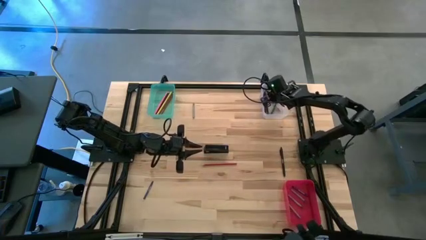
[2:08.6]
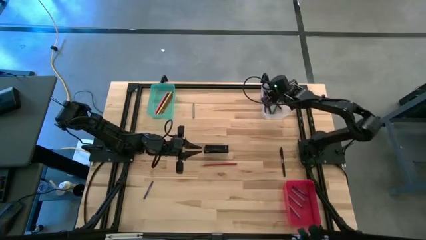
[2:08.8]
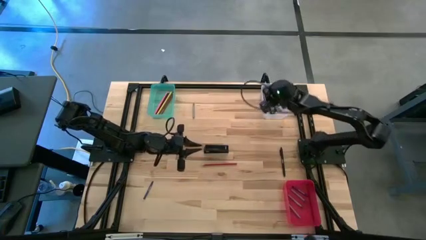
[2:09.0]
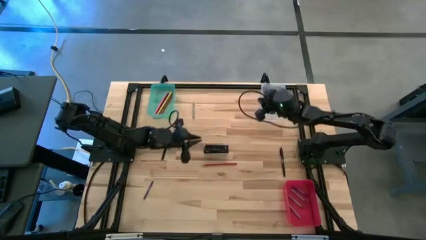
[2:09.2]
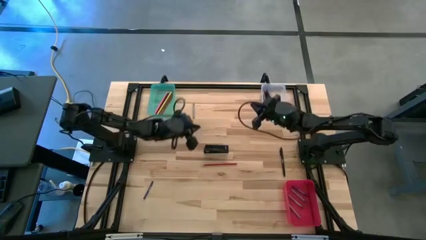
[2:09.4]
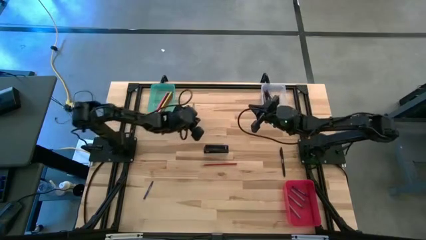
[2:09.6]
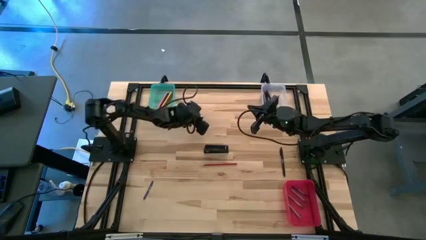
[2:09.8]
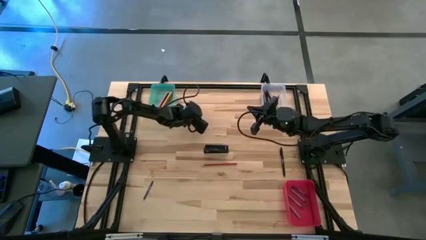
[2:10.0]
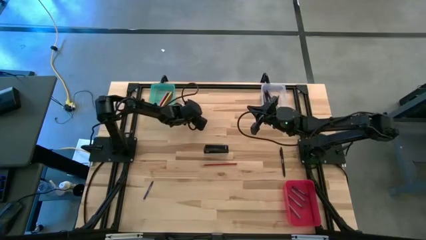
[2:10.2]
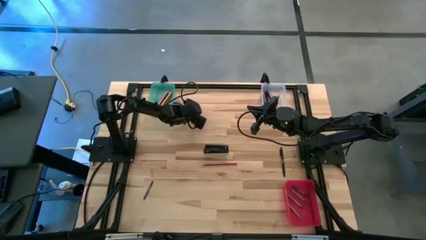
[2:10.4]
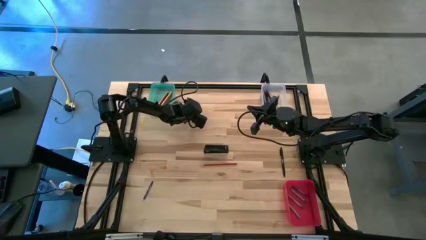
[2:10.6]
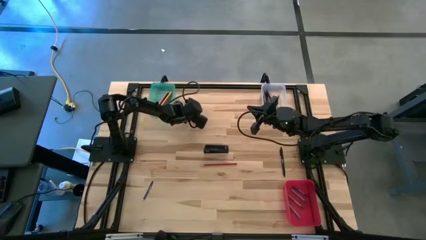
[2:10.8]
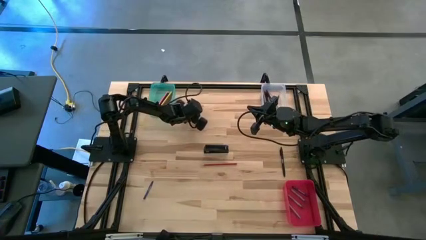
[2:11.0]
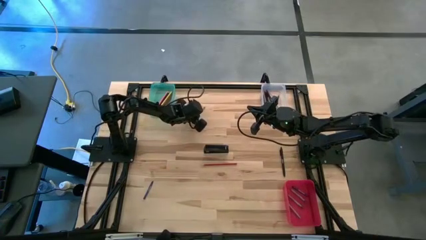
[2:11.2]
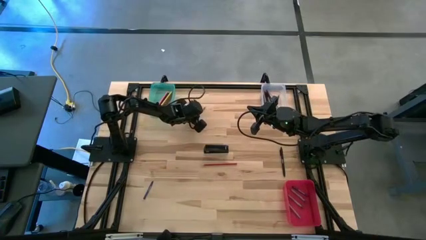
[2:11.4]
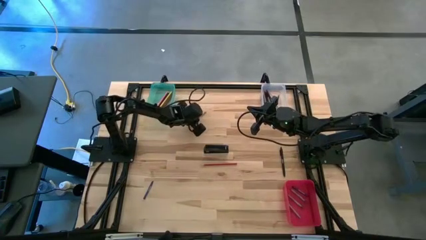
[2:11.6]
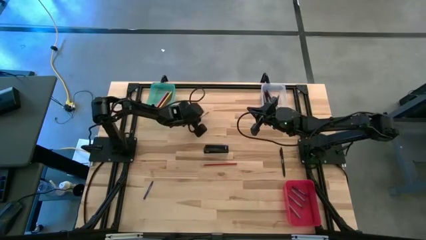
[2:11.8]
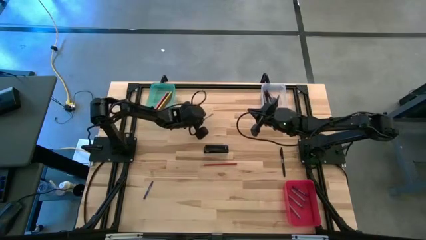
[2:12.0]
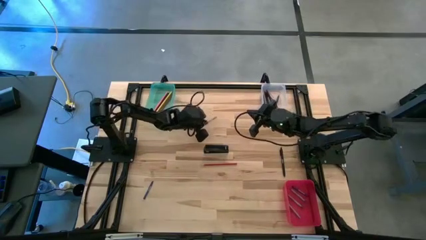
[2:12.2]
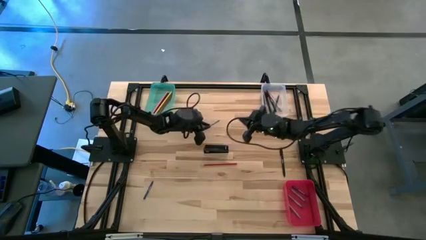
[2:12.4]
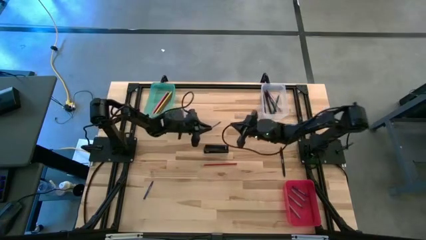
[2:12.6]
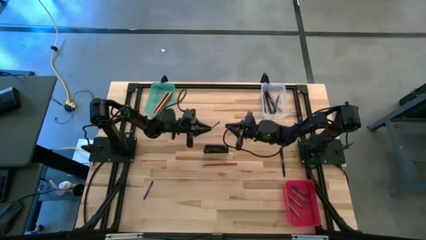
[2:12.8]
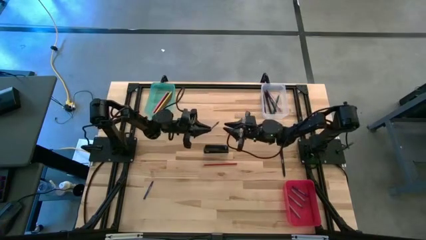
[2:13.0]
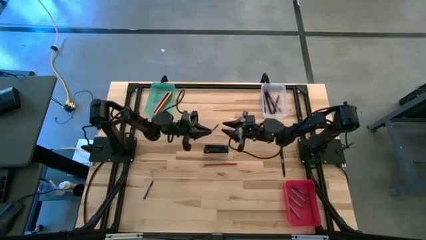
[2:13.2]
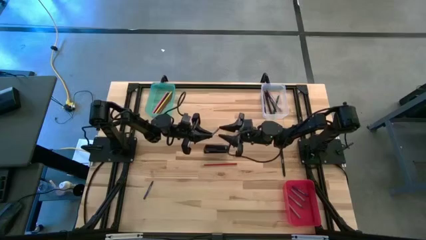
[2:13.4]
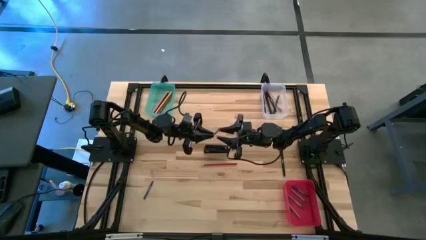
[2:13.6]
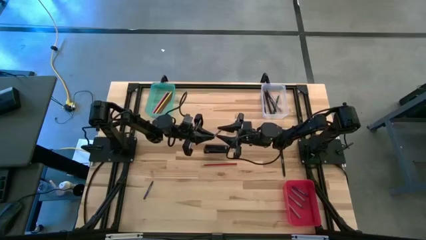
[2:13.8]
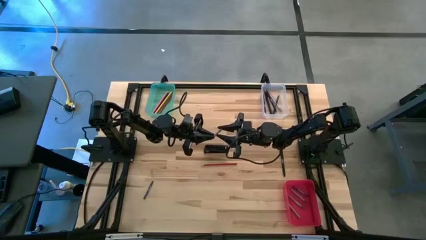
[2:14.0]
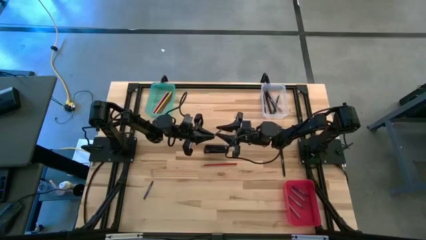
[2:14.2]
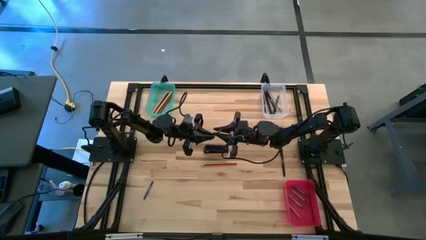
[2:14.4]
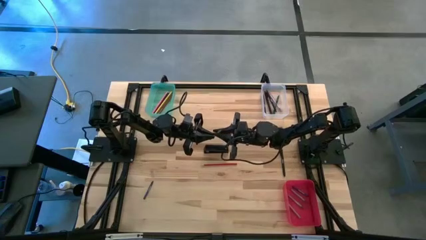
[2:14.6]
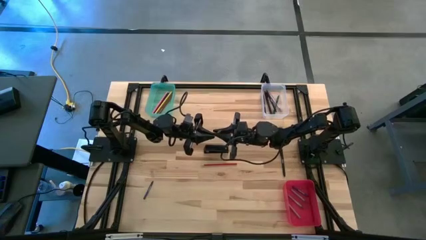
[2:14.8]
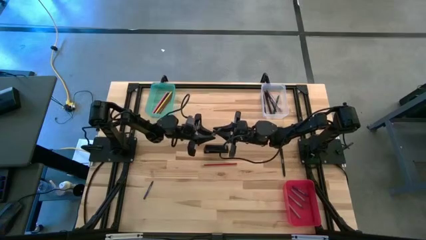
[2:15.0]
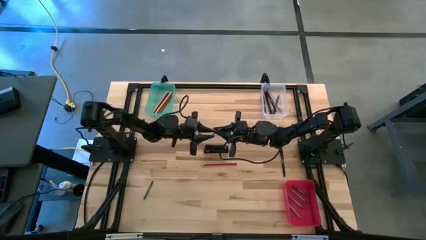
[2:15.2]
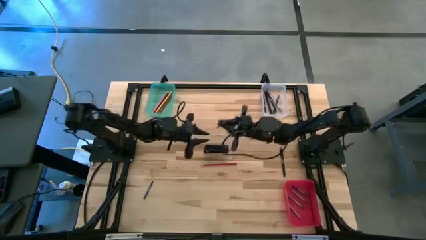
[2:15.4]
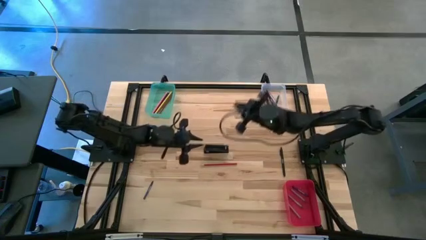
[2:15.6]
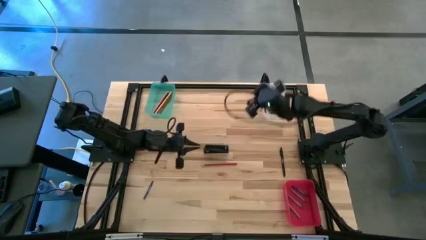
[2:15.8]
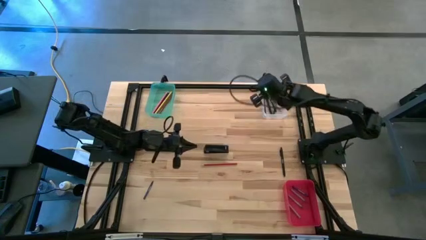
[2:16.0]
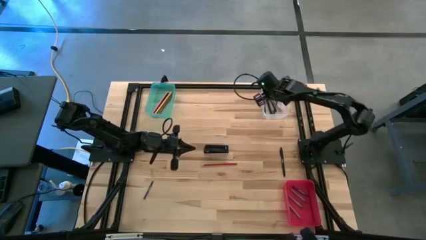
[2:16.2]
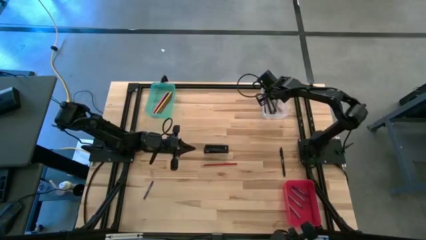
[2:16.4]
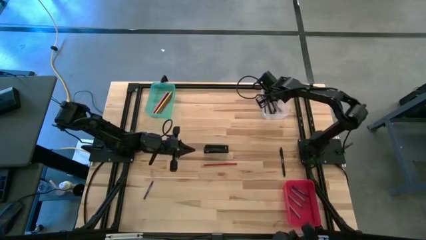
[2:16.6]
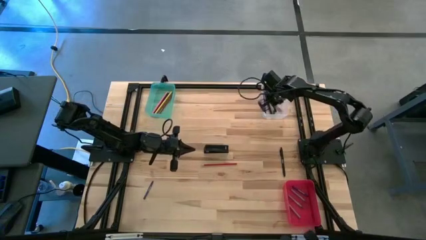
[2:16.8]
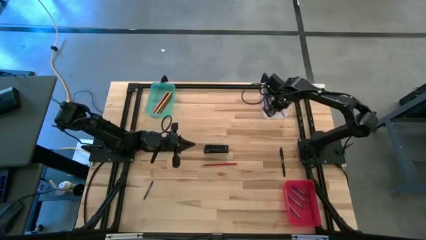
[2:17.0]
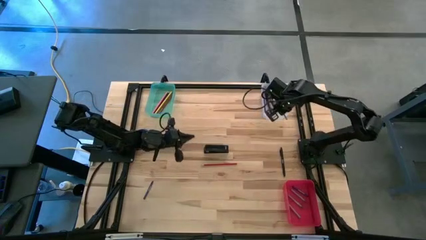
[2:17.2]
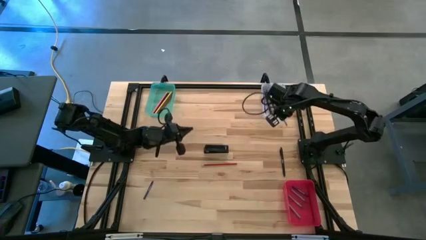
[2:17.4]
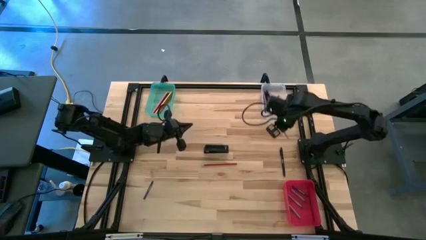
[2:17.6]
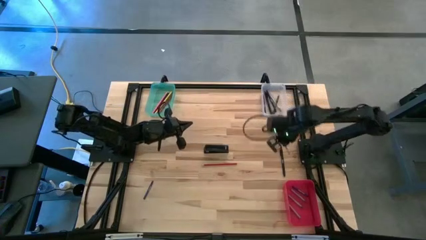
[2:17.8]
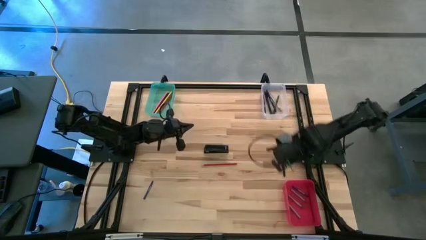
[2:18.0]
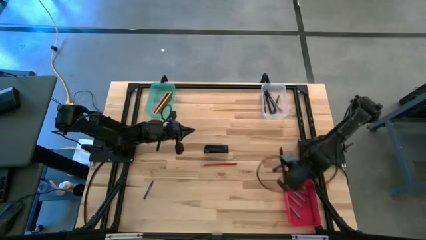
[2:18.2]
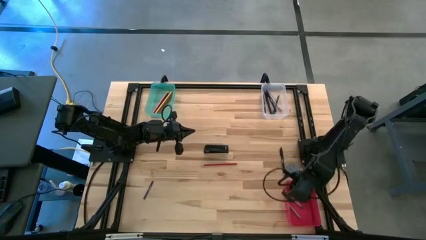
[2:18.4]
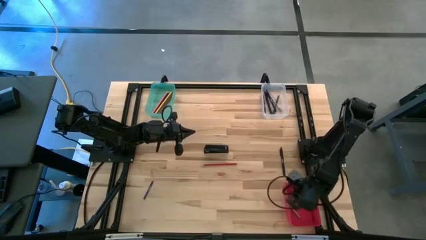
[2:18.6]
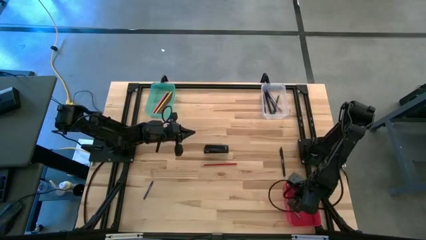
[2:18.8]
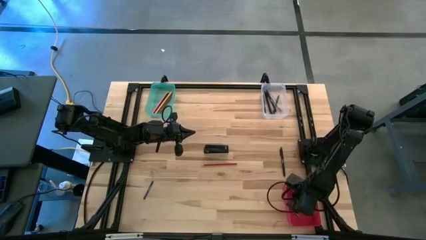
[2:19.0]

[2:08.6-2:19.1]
Task: Sort crayons/erasers/pens/pencils in bins
Put the gray crayon into the red bin

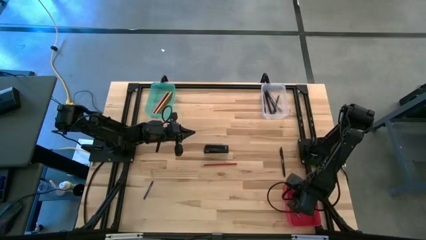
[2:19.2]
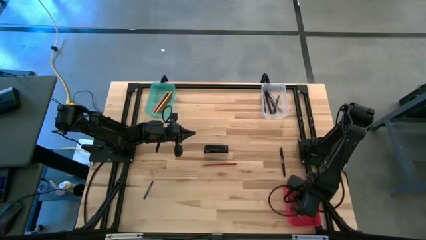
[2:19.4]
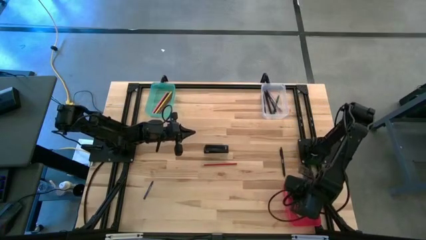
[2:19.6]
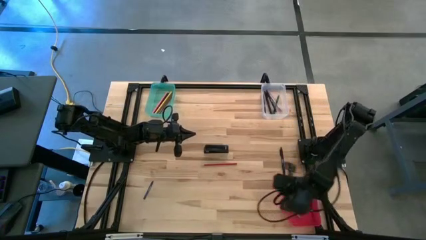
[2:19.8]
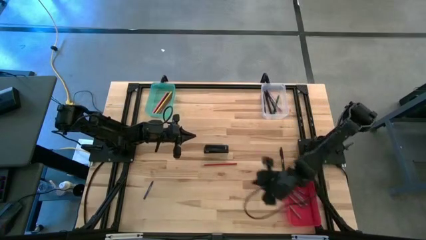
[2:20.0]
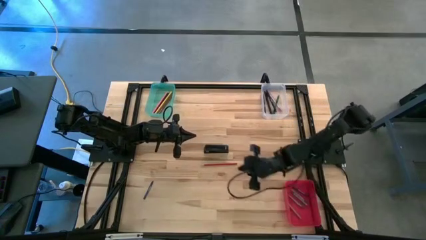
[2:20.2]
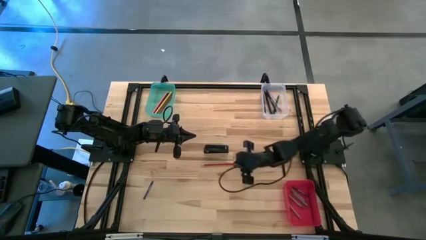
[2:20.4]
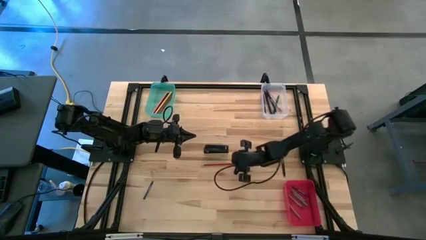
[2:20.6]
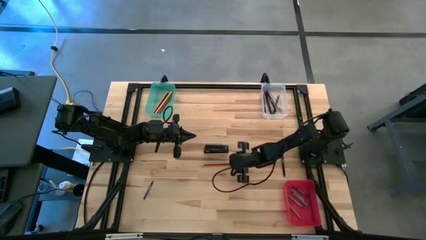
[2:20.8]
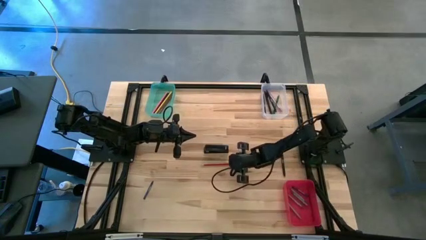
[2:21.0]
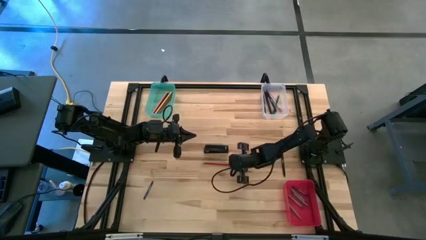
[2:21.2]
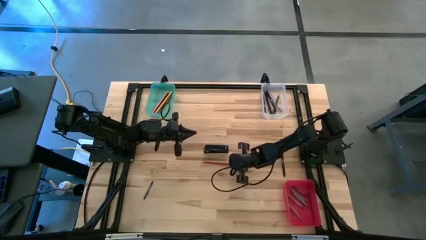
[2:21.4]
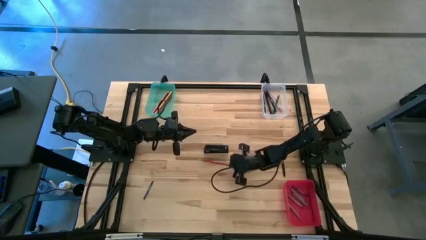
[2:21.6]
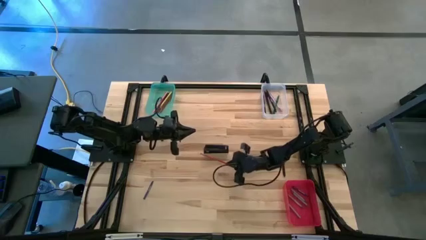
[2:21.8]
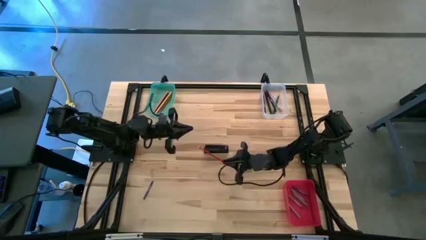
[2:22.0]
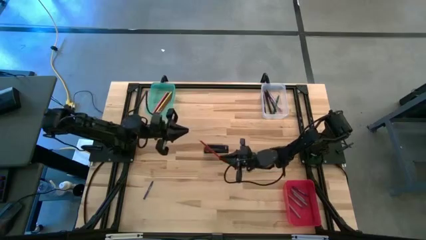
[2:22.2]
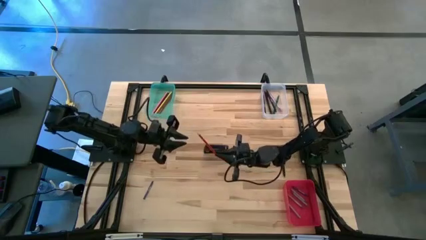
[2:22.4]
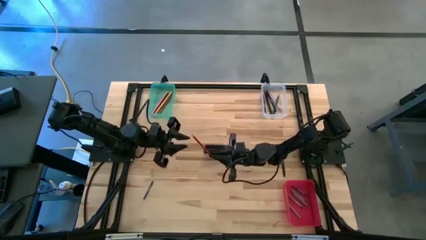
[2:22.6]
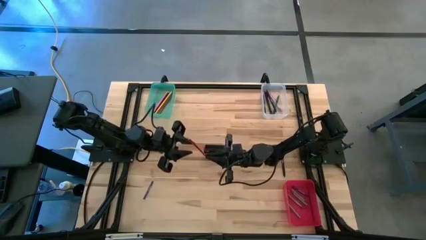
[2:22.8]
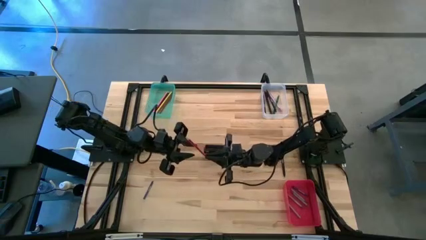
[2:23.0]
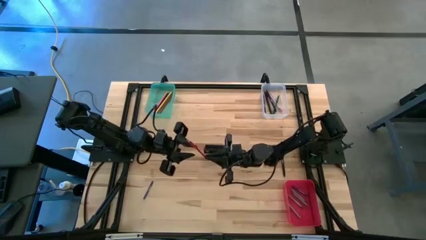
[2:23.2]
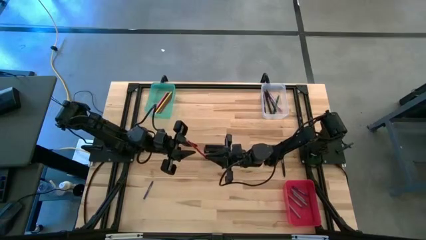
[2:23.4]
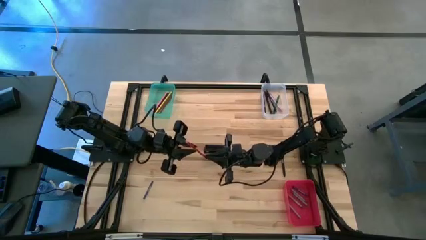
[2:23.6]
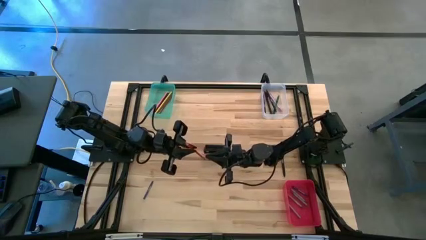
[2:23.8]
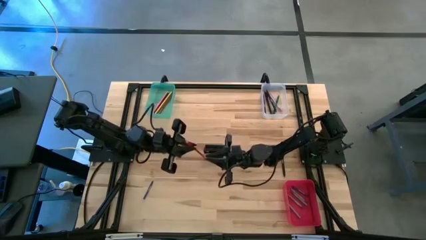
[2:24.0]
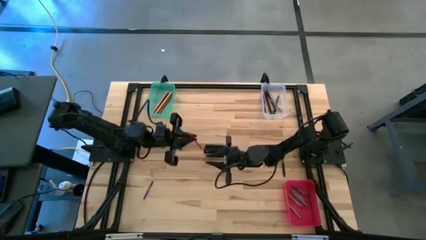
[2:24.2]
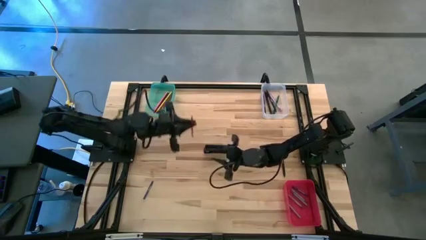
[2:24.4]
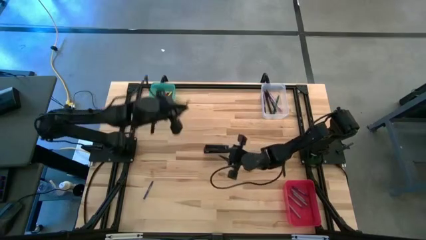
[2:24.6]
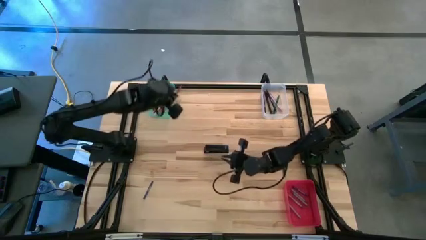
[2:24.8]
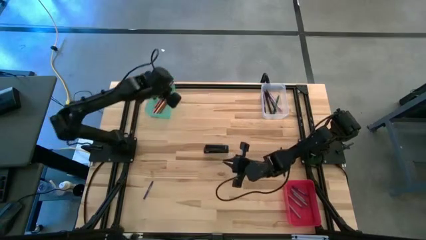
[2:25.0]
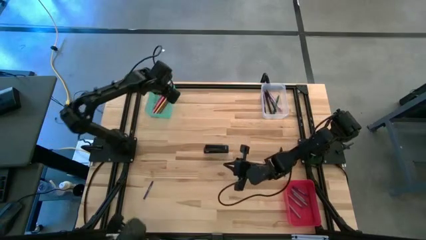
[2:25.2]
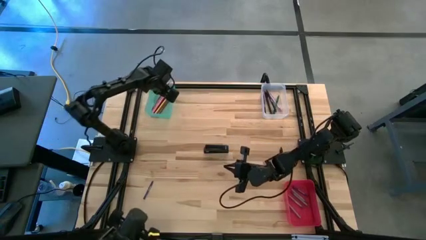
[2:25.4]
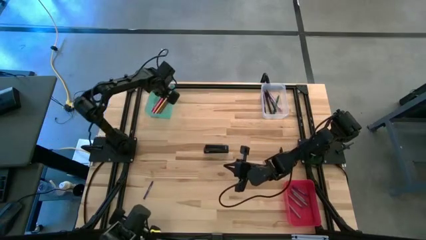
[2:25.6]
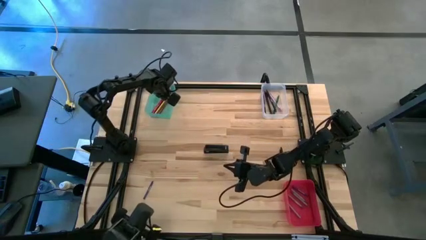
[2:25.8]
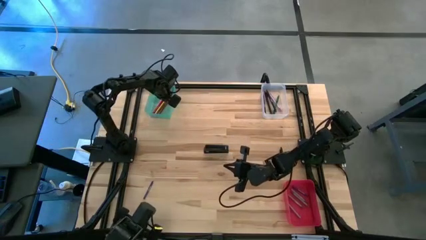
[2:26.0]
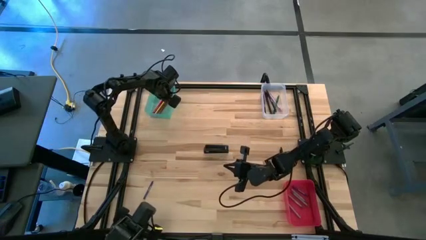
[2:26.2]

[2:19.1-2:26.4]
Put the orange color pencil into the green bin
